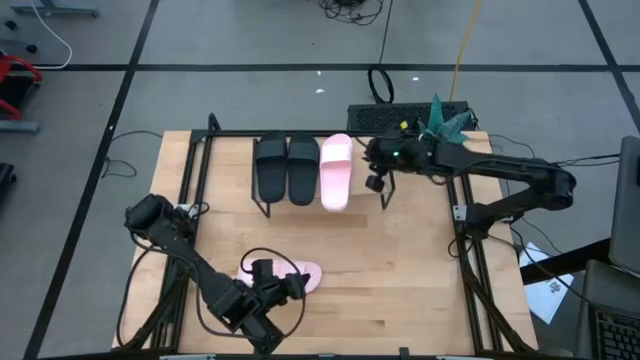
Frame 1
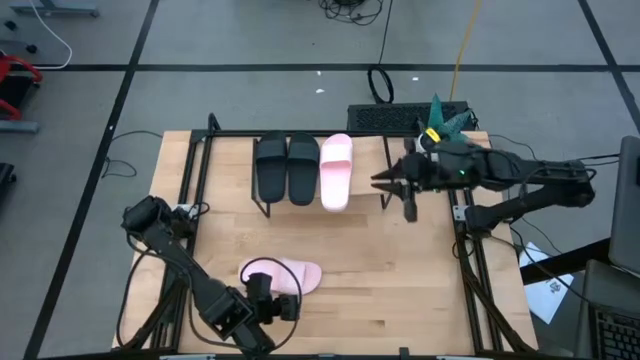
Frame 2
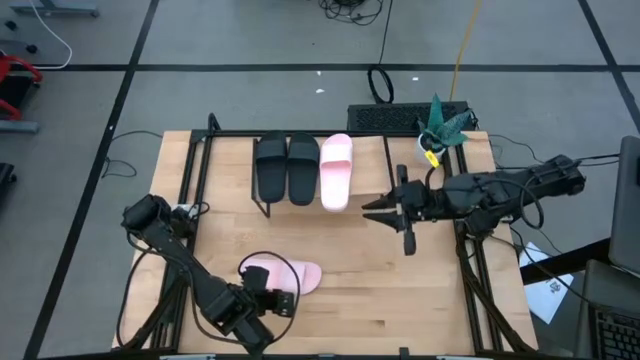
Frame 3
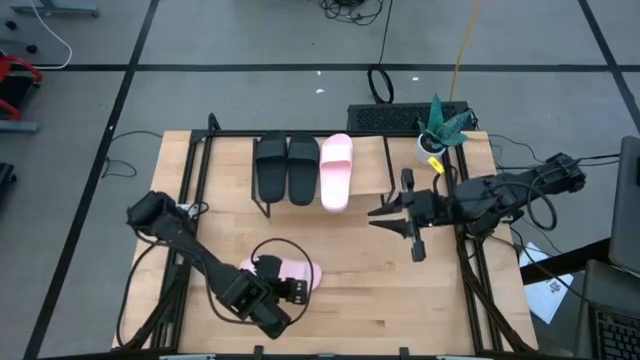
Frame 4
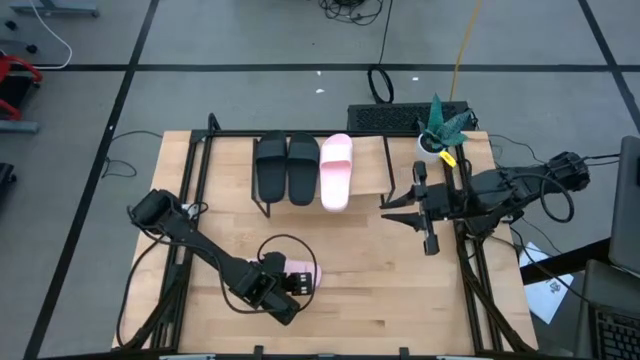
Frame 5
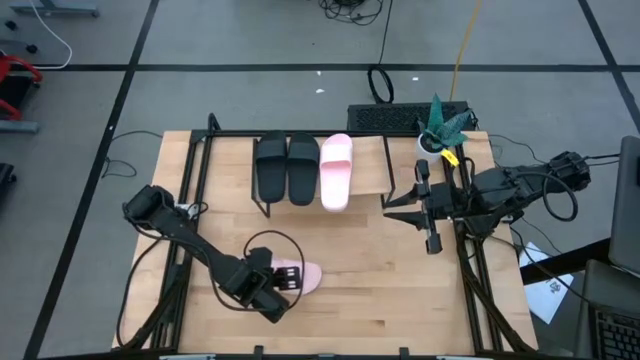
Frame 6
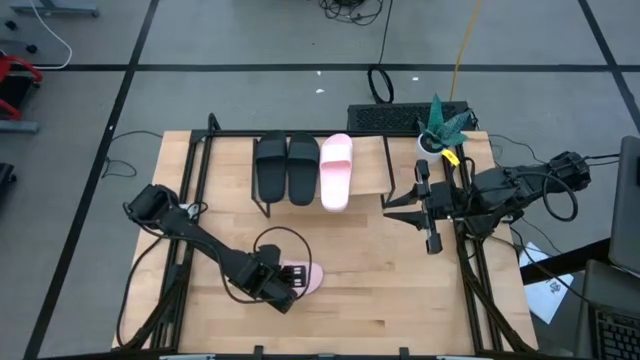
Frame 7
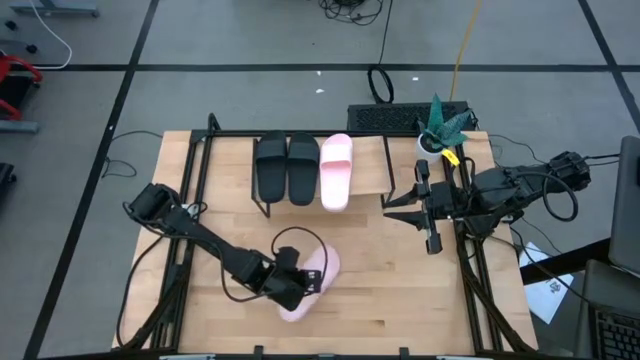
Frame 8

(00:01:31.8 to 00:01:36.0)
Task: Pick and place slides into the shelf
Put the pink slide on the shelf

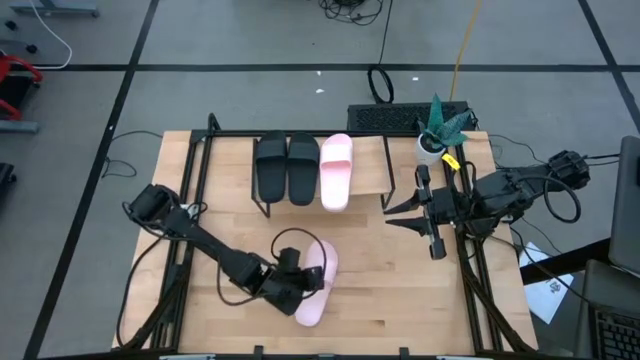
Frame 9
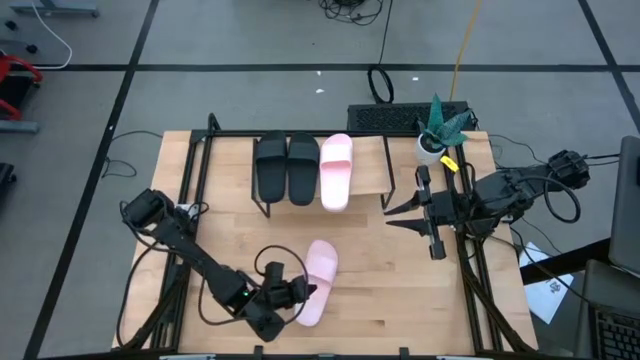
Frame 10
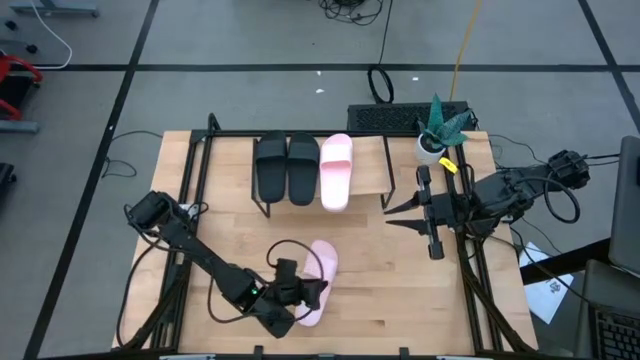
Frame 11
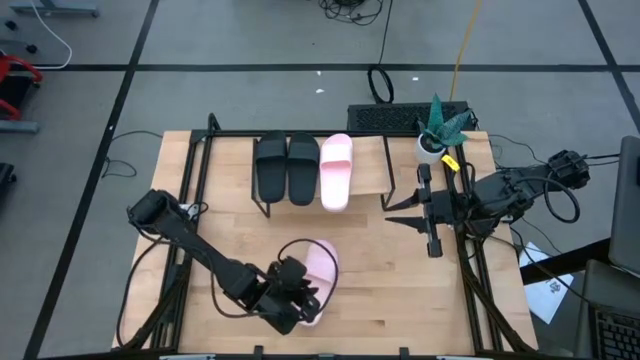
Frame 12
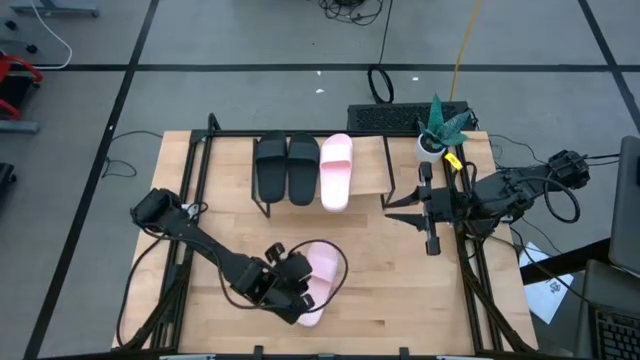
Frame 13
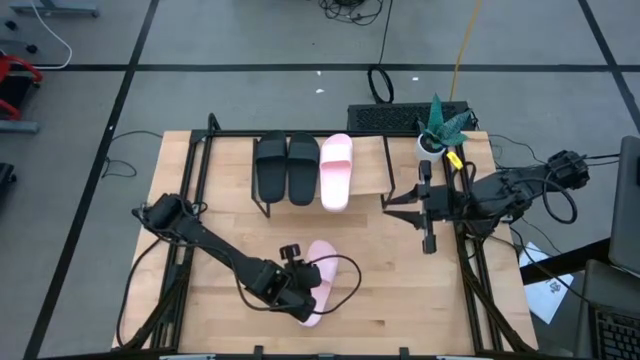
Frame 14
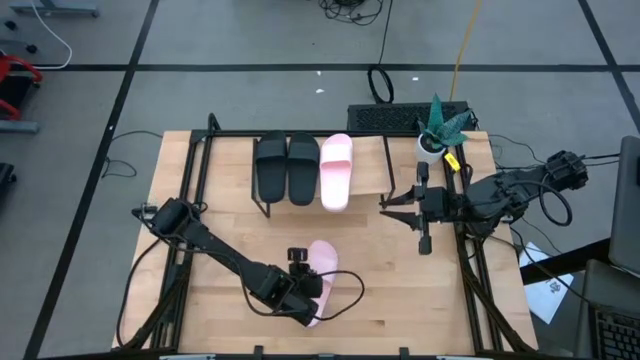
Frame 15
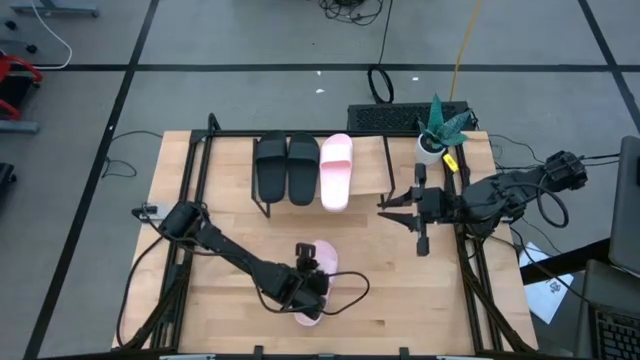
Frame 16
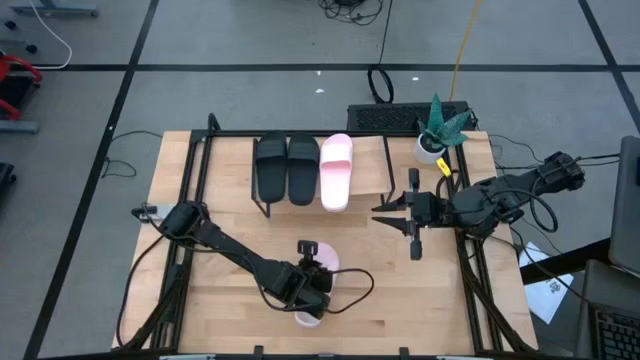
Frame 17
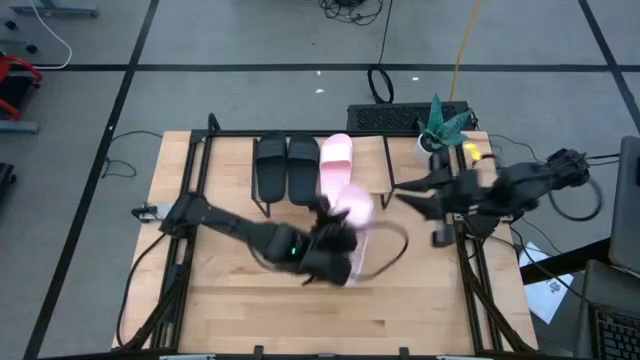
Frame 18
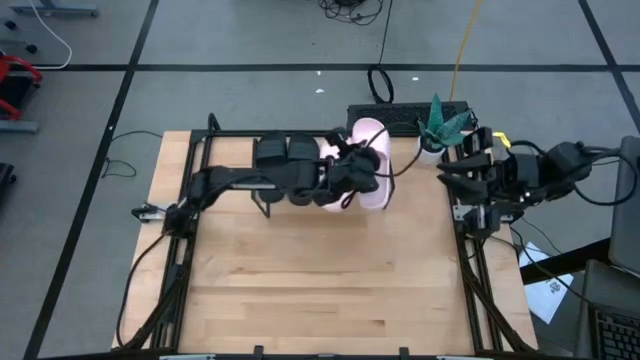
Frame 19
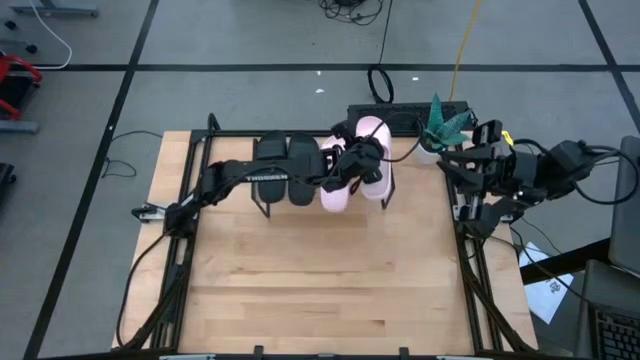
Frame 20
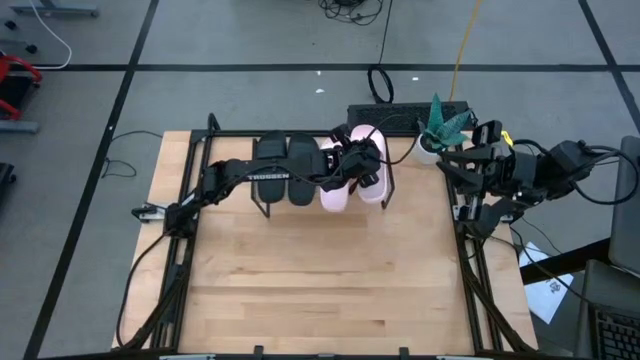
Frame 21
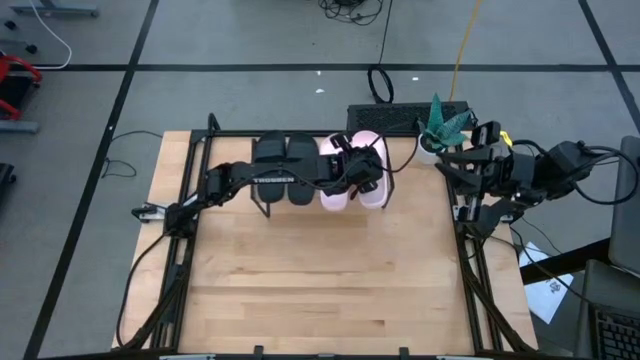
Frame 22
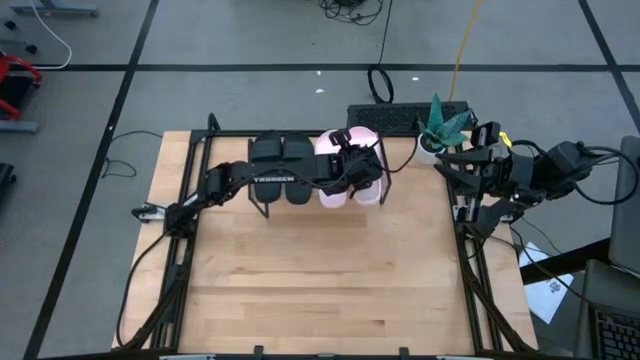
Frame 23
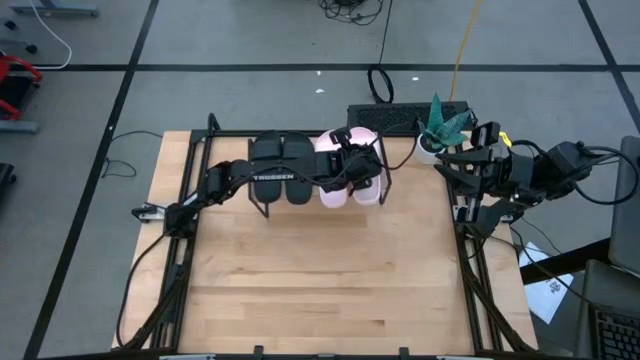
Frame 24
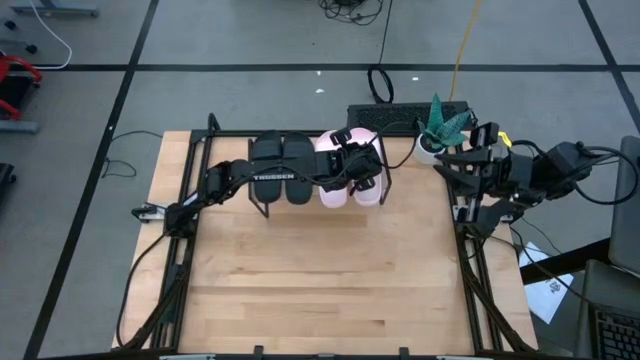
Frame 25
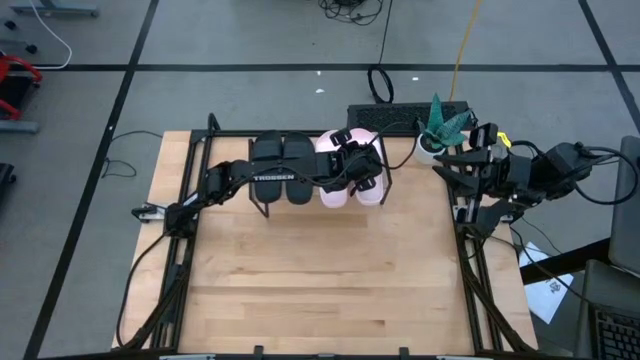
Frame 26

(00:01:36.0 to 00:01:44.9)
Put the pink slide on the shelf
